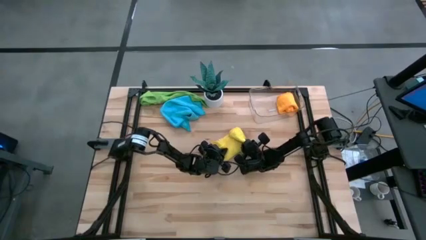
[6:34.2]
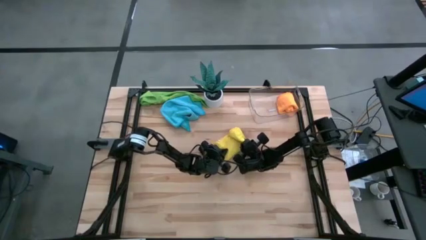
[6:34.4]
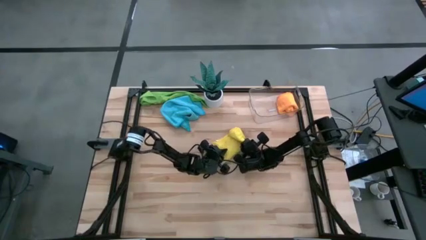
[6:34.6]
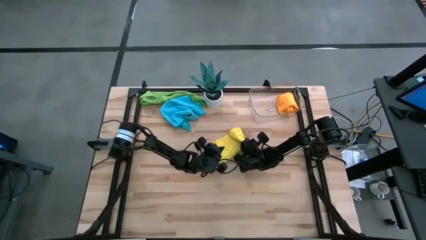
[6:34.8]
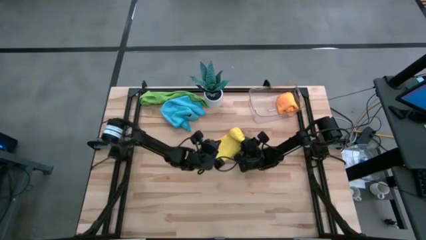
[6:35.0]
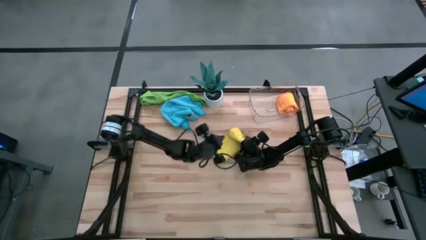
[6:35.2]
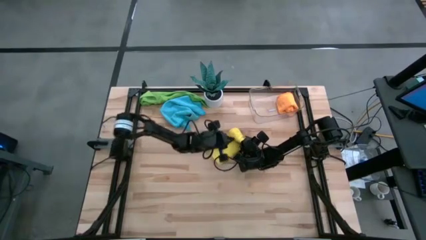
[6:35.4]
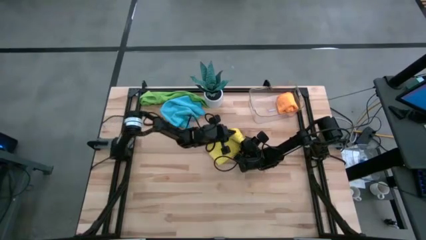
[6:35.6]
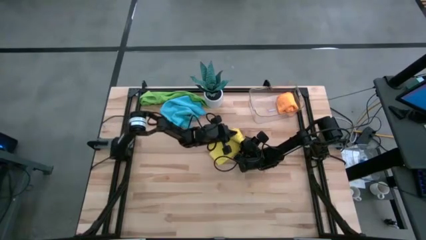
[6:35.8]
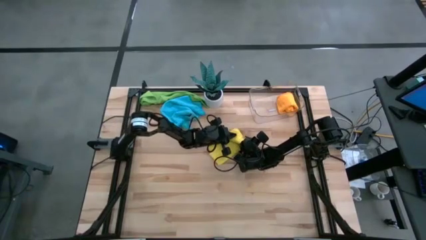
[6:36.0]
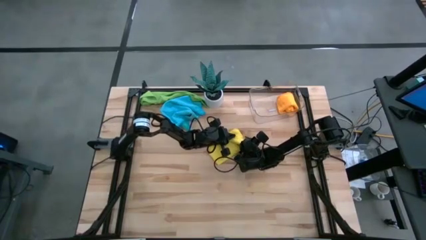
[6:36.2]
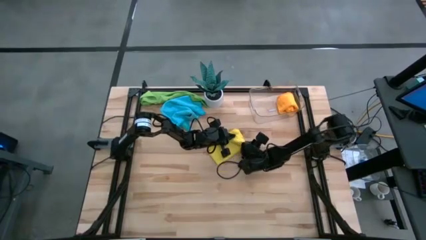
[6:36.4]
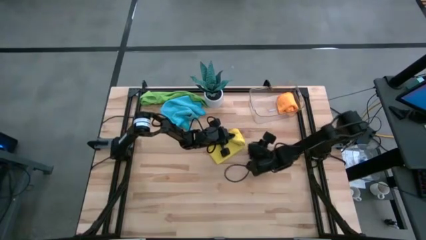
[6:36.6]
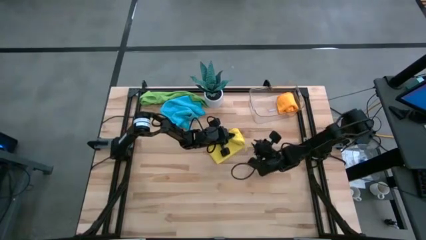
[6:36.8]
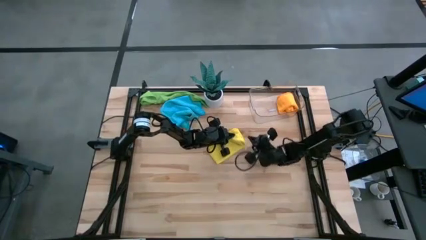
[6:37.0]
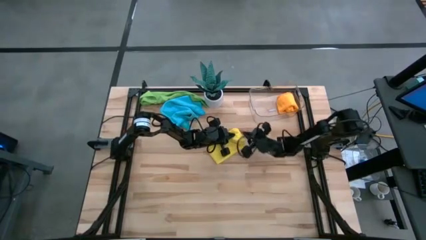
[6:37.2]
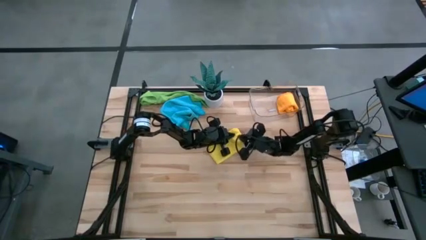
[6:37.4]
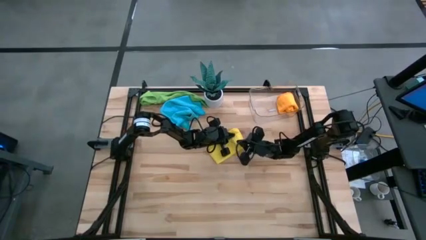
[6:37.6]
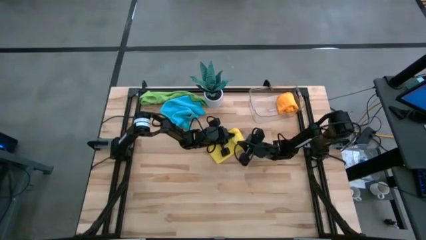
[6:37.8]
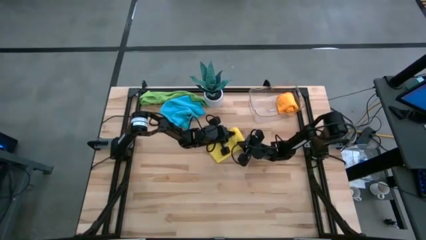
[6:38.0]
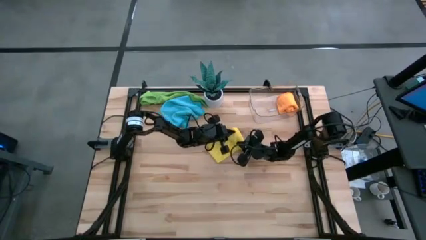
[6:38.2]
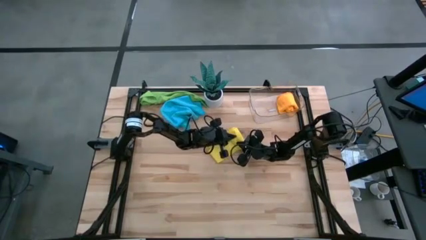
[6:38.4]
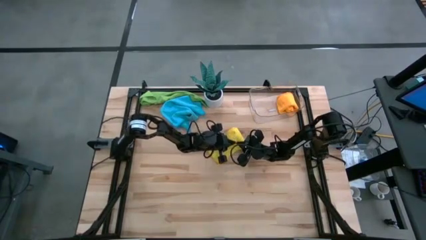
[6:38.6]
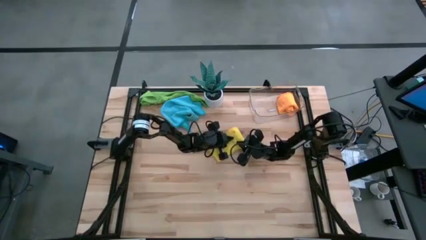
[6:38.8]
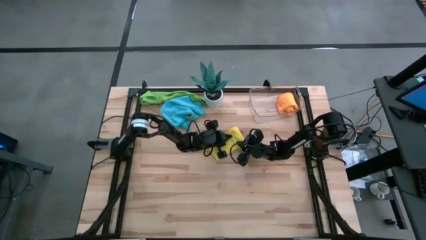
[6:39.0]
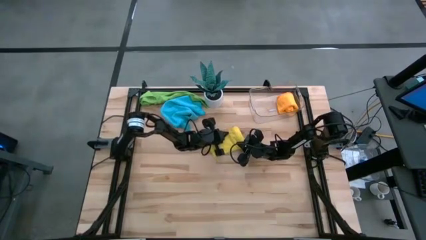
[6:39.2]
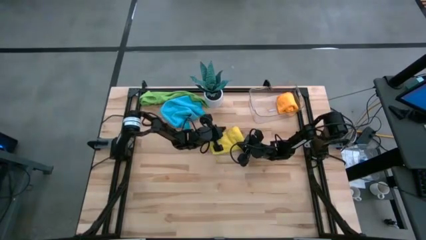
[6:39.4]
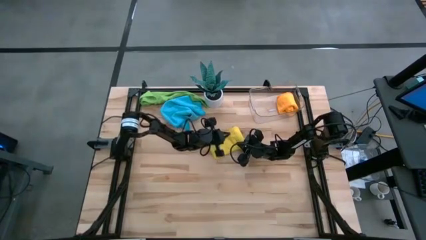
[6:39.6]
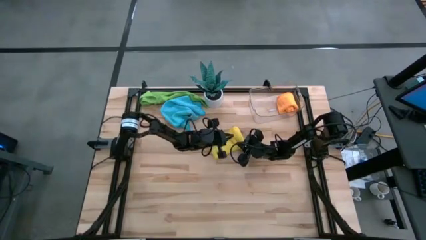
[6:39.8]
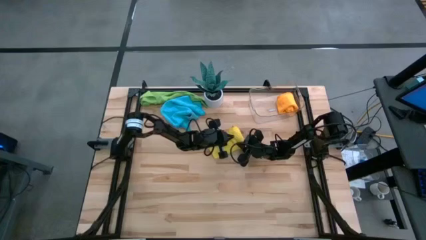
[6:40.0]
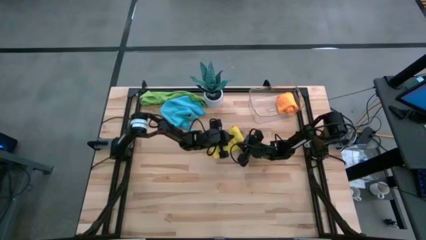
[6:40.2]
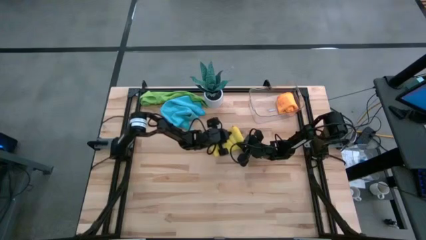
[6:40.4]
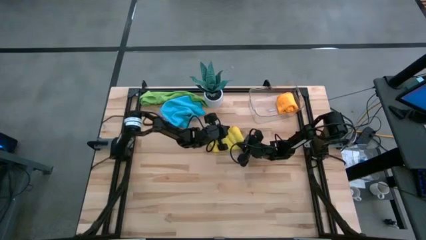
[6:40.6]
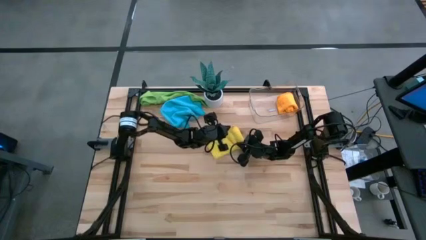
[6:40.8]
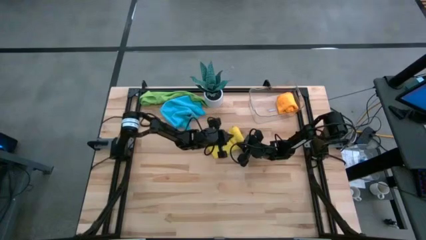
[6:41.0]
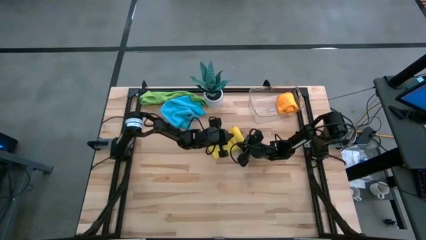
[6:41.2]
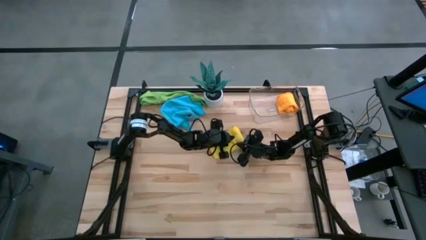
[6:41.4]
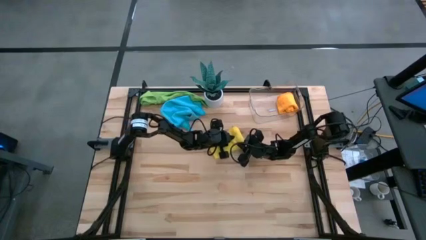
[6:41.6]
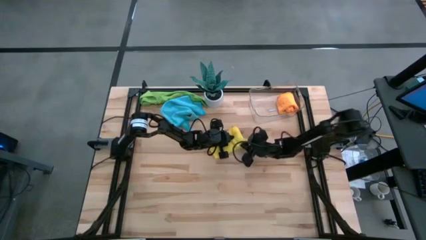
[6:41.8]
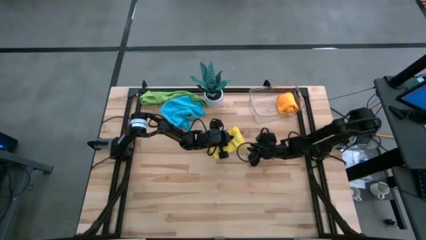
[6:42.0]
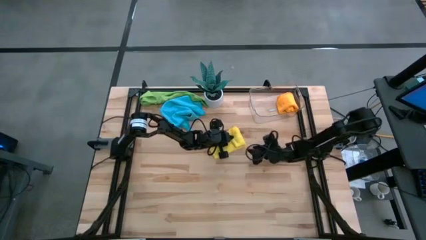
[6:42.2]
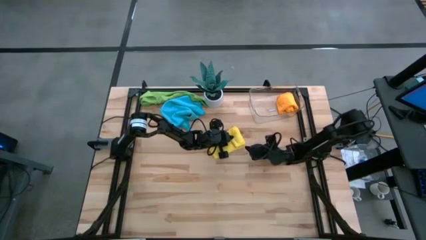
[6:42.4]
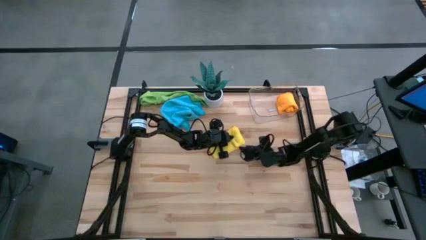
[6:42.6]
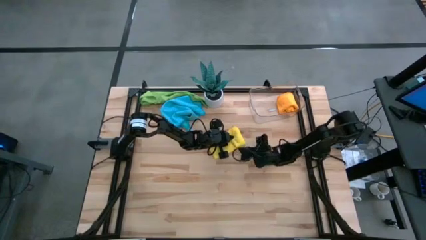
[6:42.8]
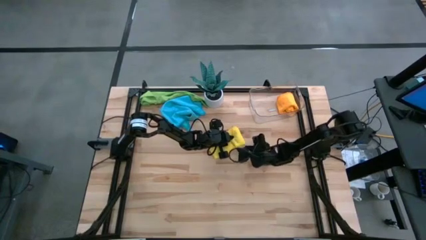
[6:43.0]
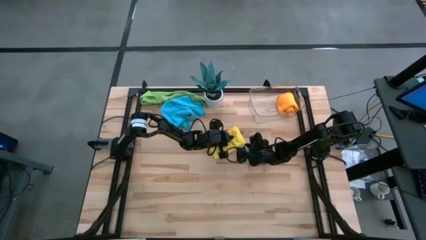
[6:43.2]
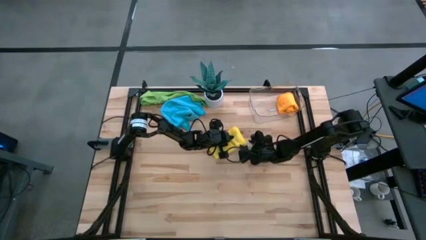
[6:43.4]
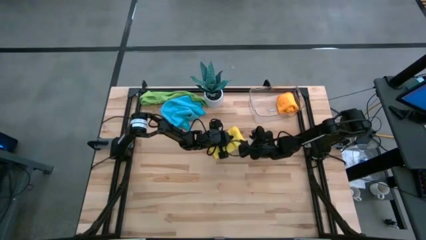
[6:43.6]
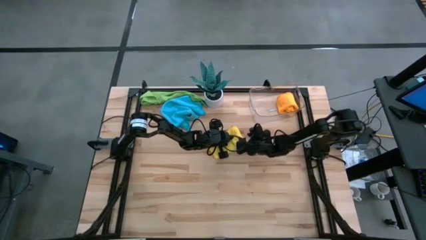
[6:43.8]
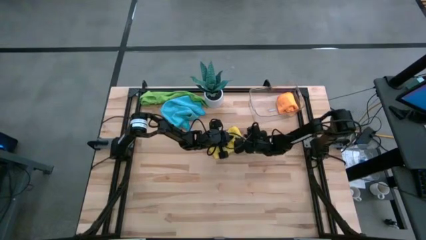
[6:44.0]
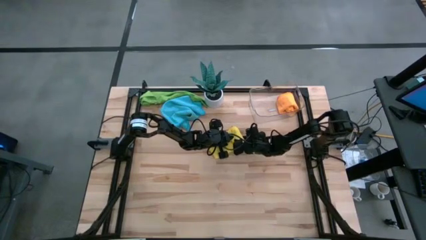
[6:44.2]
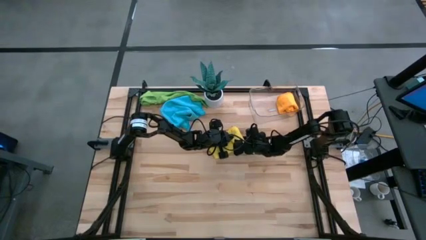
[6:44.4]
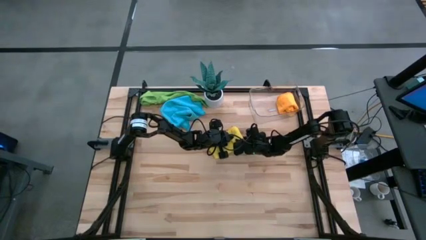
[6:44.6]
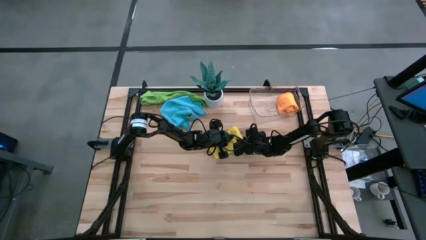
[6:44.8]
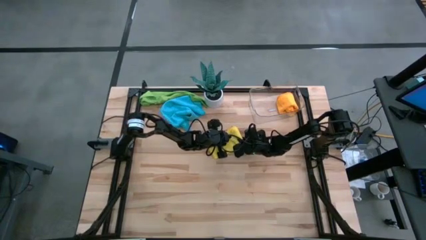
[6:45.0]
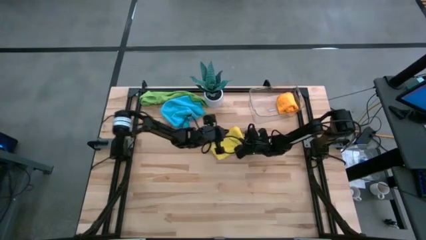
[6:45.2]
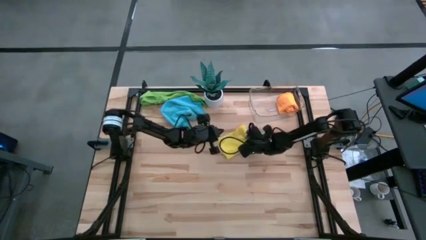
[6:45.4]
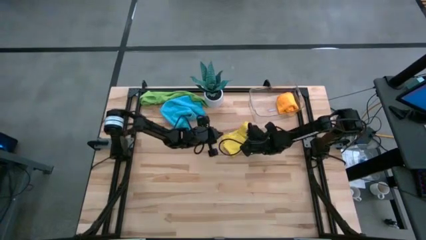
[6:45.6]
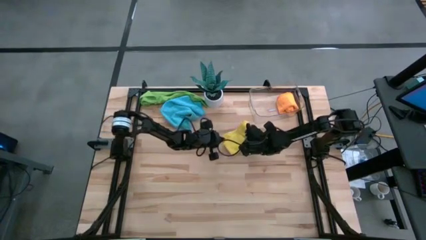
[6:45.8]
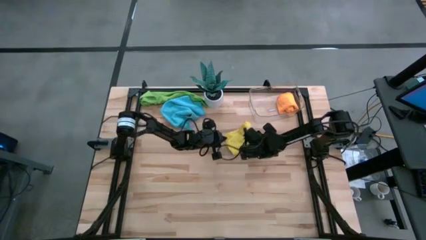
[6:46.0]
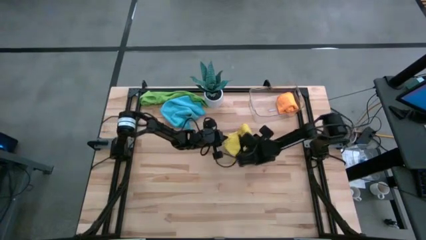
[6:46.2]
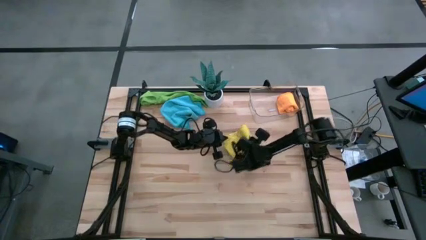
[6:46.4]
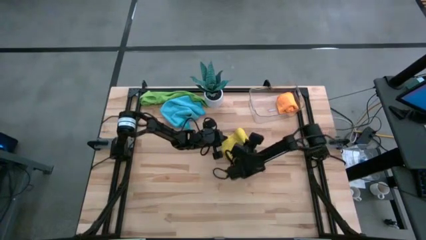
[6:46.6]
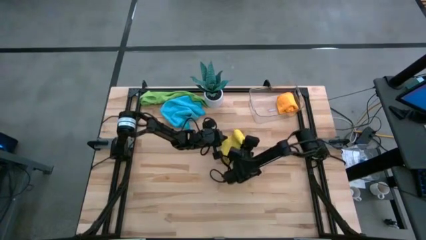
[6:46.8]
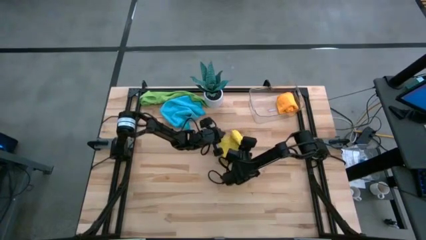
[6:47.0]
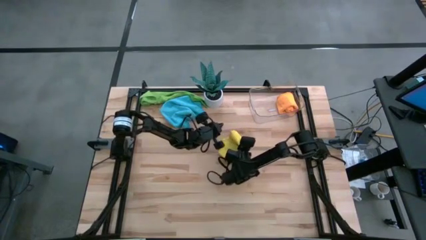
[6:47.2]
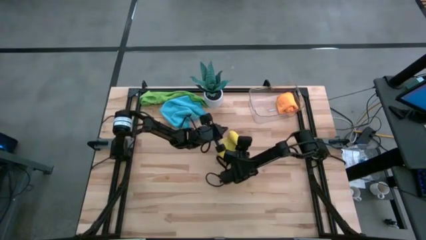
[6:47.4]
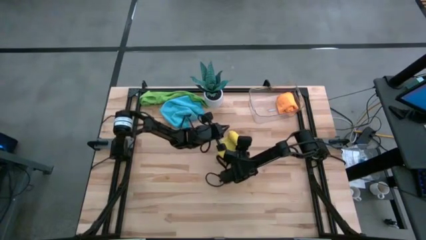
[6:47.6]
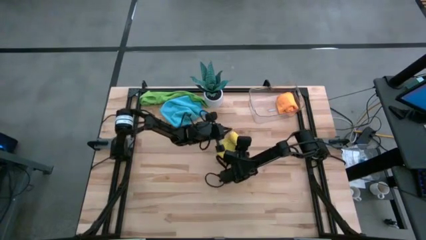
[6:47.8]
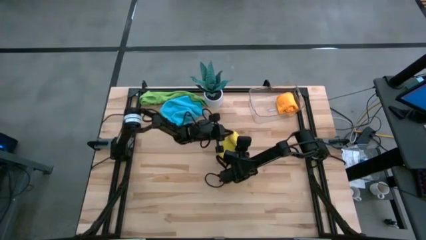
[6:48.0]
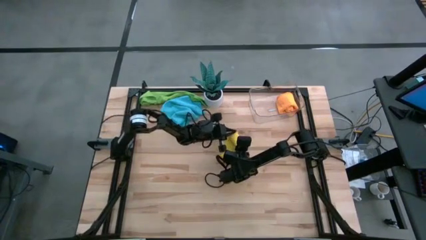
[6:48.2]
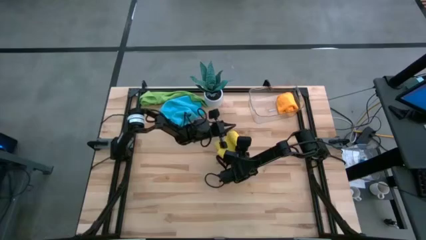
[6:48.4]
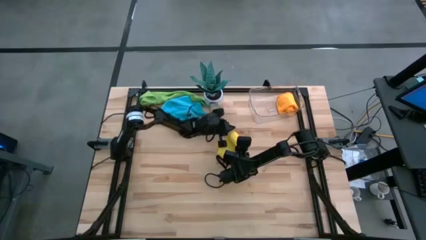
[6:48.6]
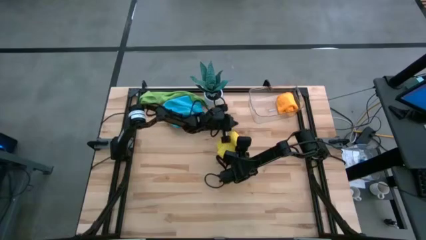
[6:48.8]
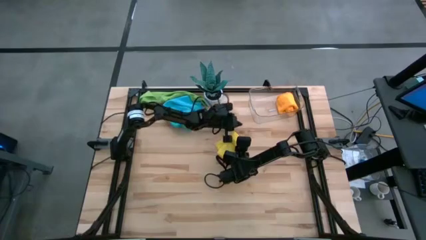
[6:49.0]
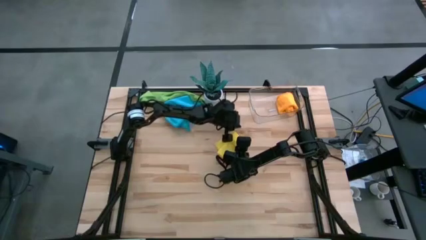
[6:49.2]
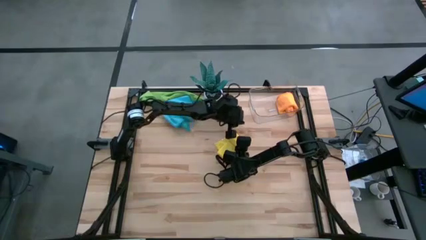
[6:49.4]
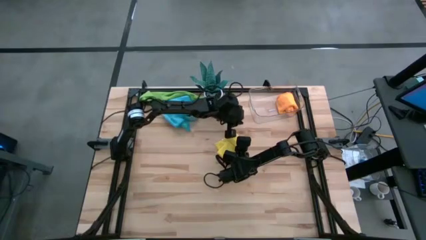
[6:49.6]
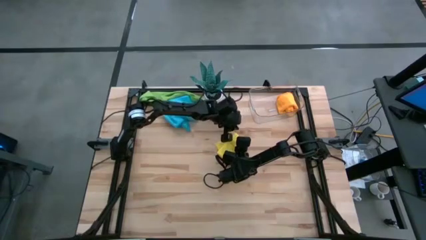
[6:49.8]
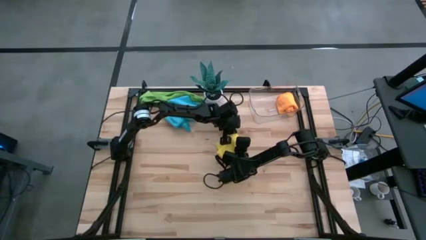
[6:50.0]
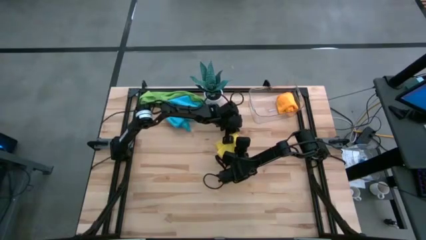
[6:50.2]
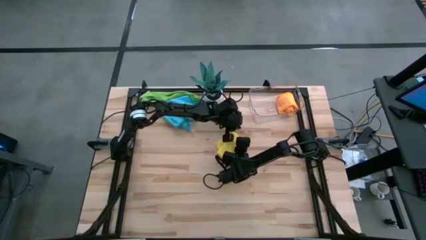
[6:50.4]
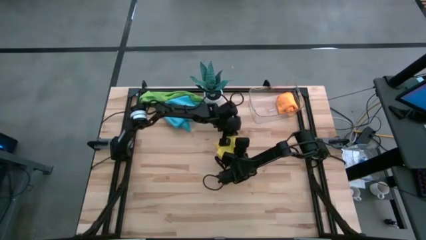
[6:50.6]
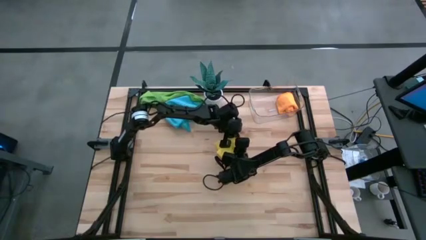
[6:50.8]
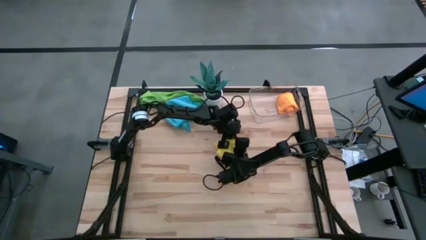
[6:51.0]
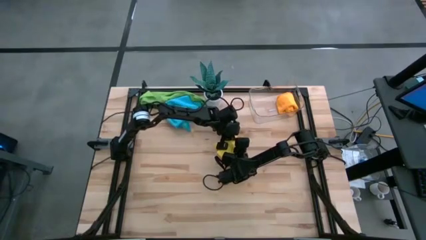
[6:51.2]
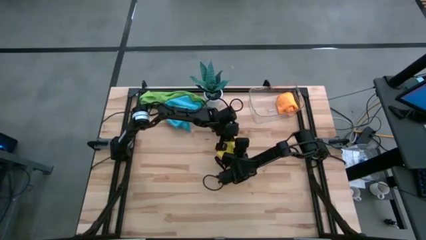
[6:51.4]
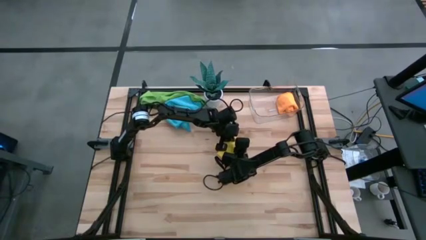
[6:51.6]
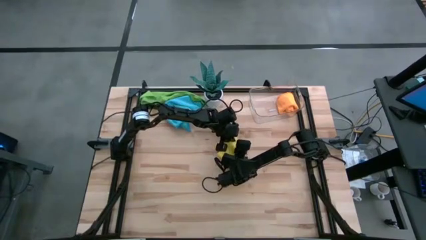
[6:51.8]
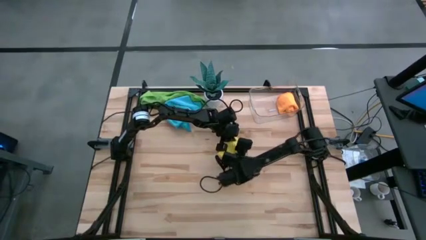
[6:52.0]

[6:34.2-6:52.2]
Task: Roll microfiber towels into tight, uniform cylinder then place into a basket
Roll the yellow microfiber cloth
